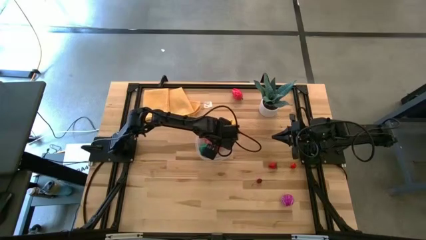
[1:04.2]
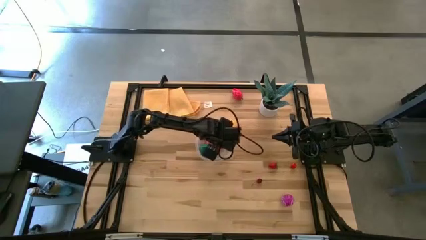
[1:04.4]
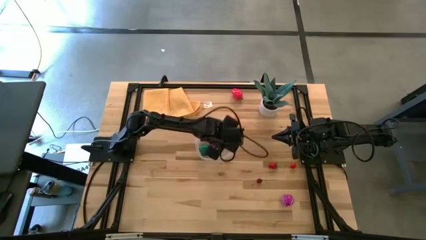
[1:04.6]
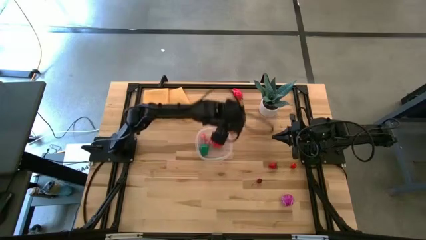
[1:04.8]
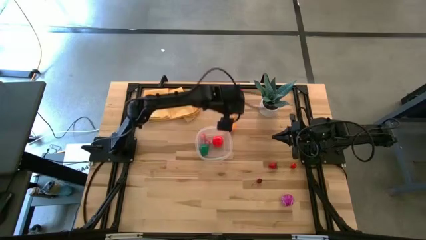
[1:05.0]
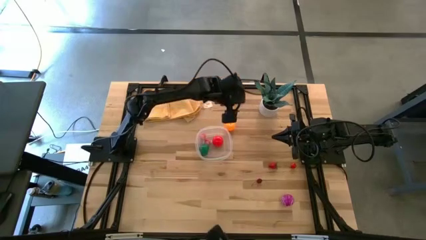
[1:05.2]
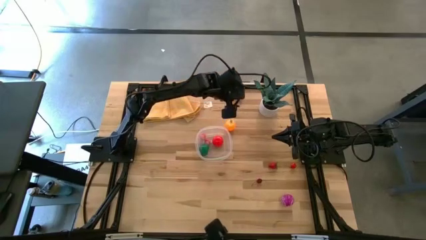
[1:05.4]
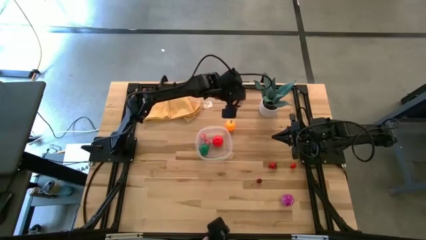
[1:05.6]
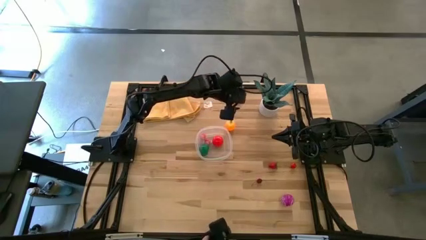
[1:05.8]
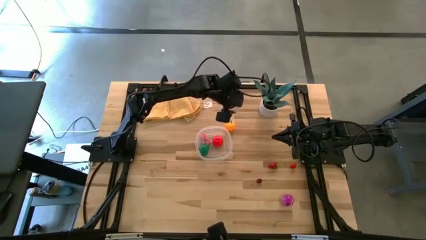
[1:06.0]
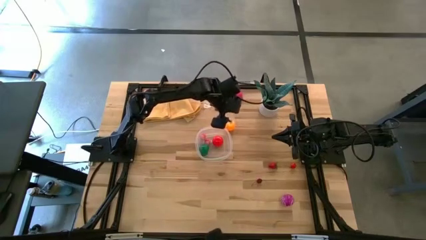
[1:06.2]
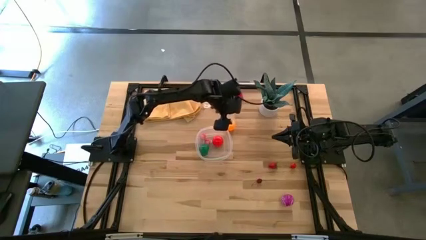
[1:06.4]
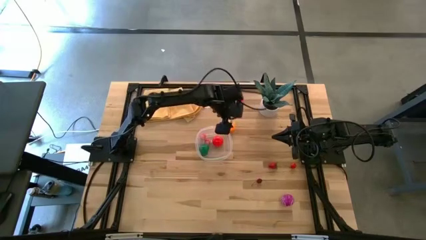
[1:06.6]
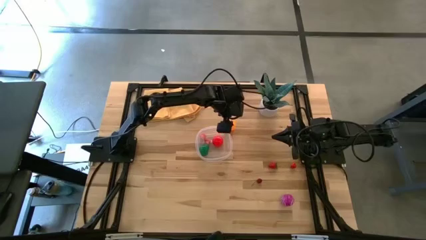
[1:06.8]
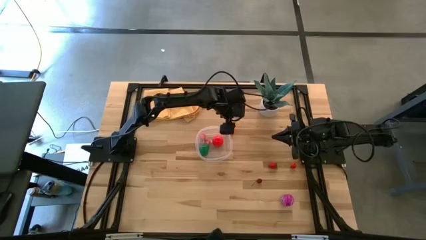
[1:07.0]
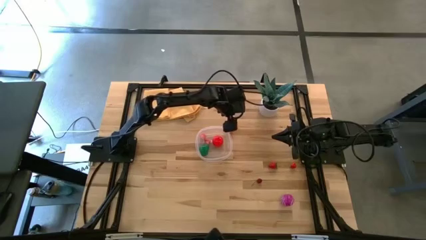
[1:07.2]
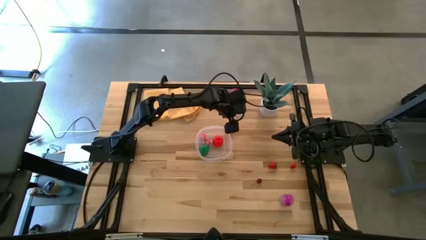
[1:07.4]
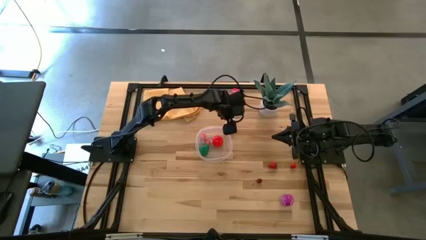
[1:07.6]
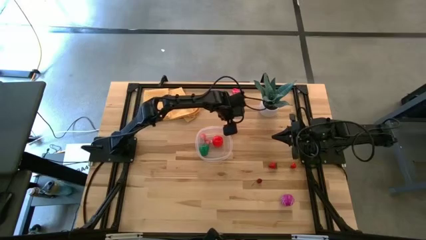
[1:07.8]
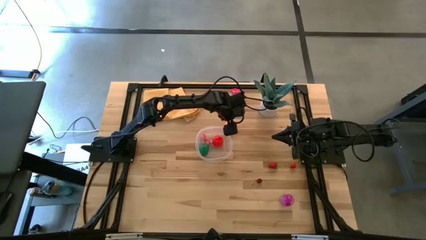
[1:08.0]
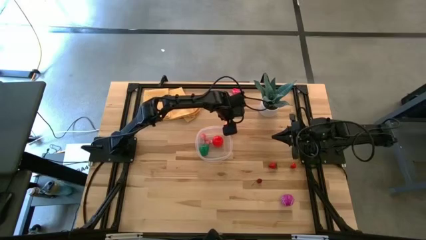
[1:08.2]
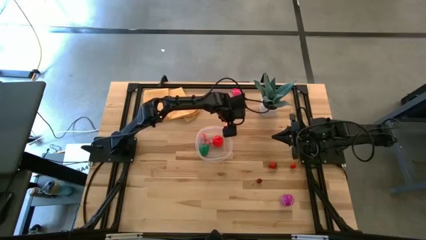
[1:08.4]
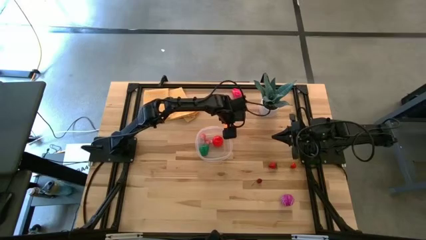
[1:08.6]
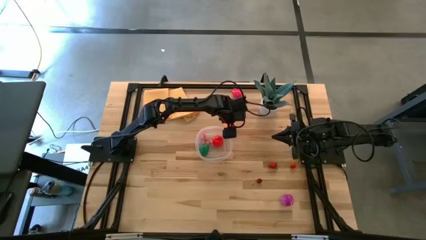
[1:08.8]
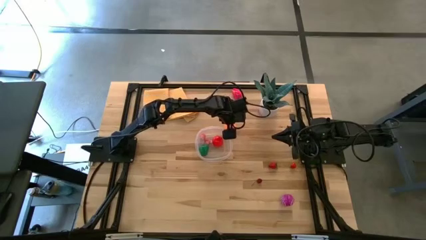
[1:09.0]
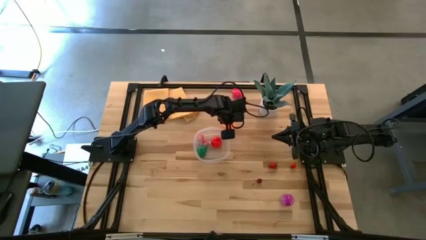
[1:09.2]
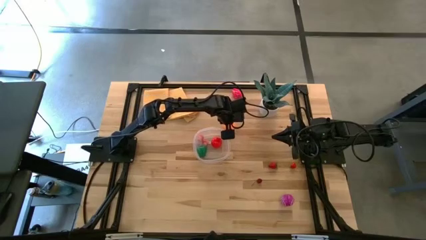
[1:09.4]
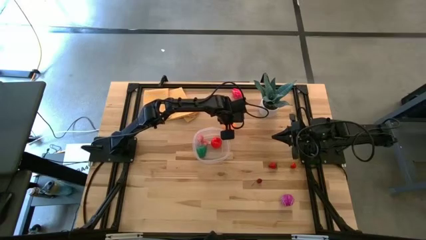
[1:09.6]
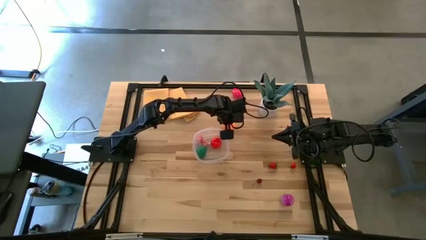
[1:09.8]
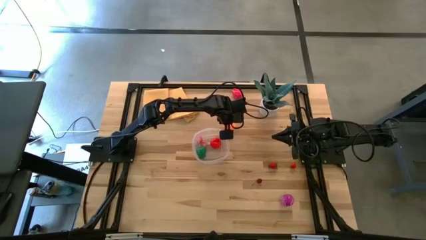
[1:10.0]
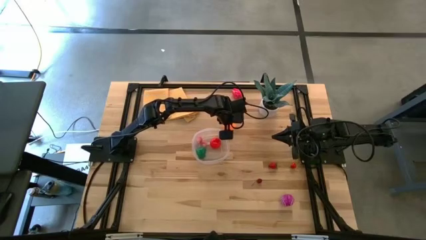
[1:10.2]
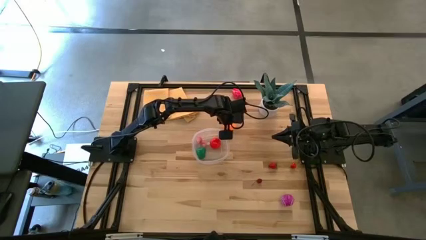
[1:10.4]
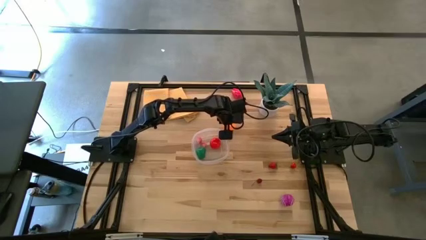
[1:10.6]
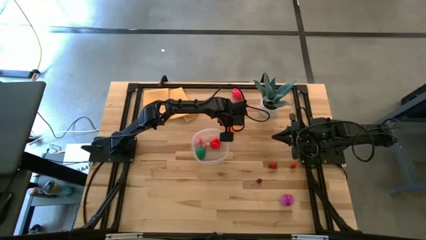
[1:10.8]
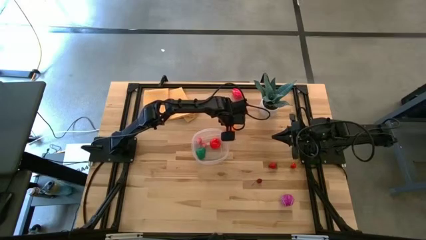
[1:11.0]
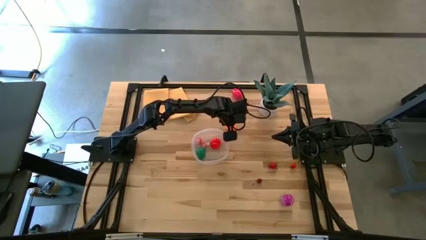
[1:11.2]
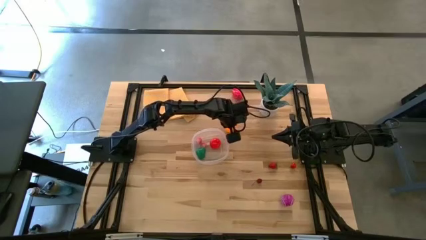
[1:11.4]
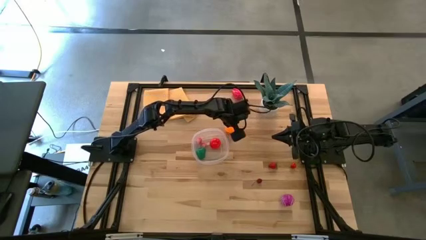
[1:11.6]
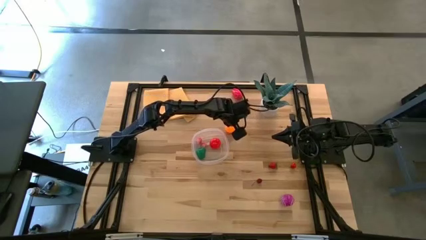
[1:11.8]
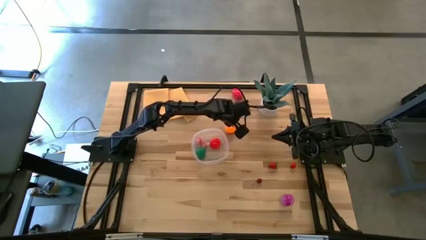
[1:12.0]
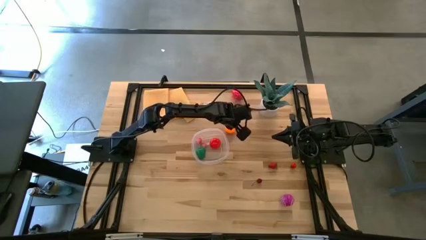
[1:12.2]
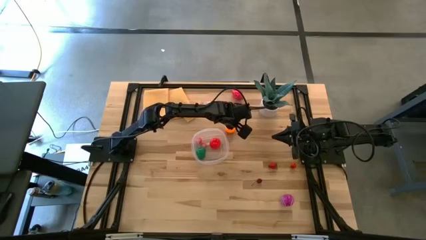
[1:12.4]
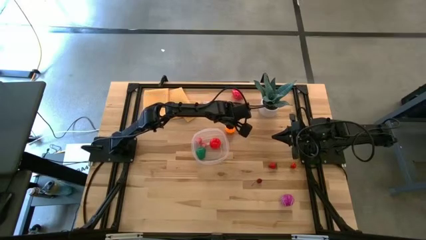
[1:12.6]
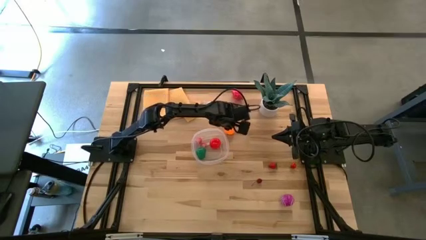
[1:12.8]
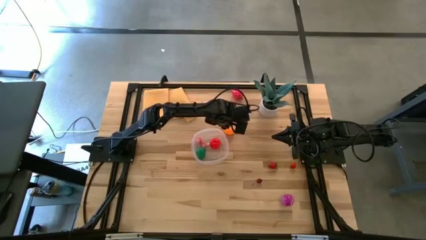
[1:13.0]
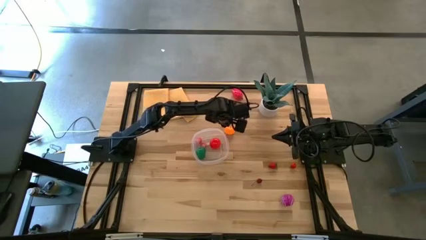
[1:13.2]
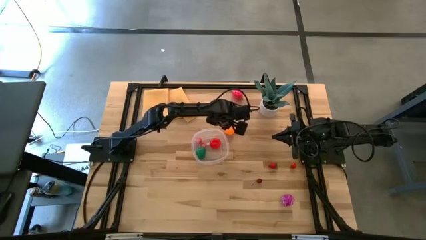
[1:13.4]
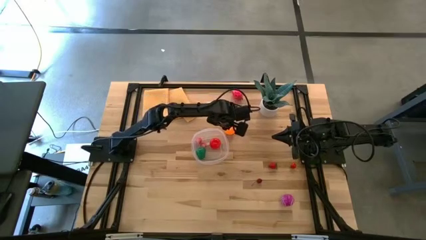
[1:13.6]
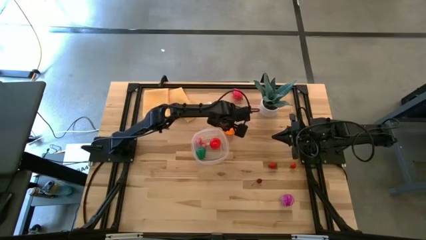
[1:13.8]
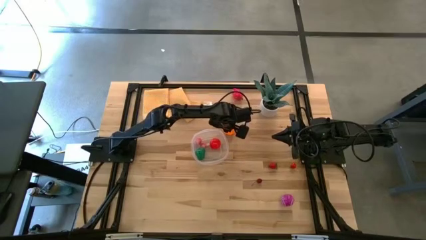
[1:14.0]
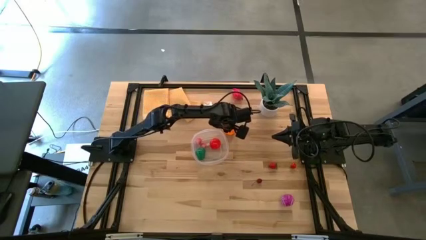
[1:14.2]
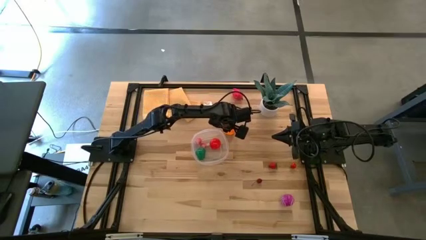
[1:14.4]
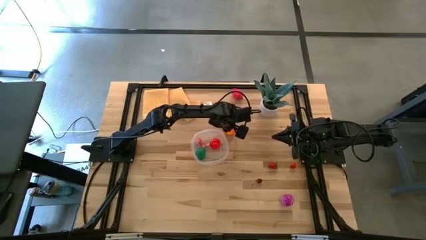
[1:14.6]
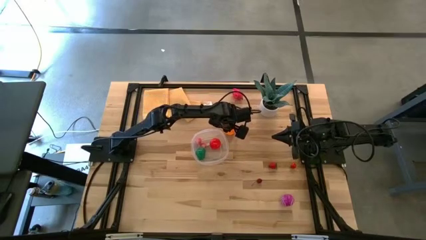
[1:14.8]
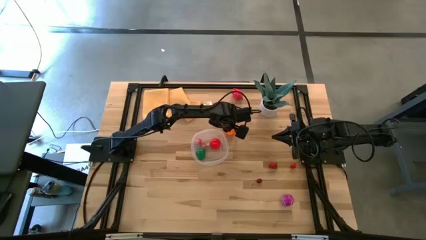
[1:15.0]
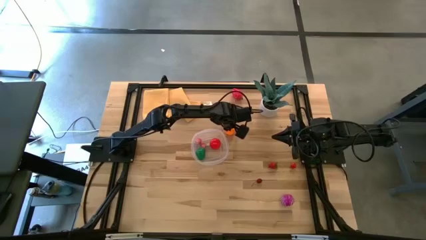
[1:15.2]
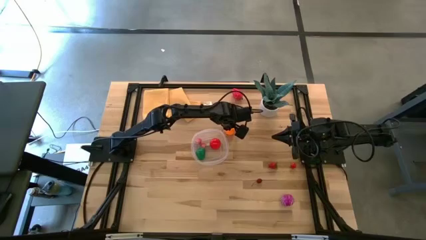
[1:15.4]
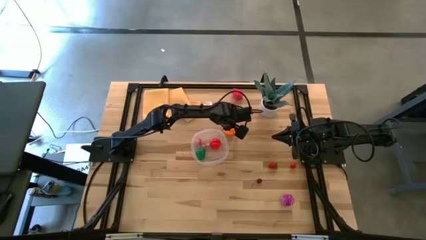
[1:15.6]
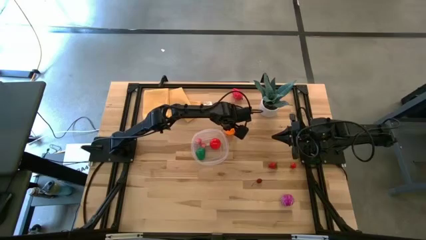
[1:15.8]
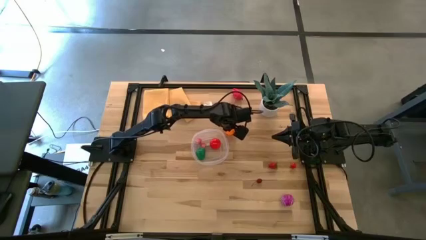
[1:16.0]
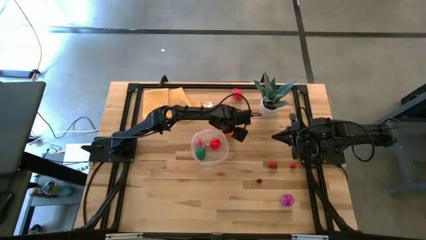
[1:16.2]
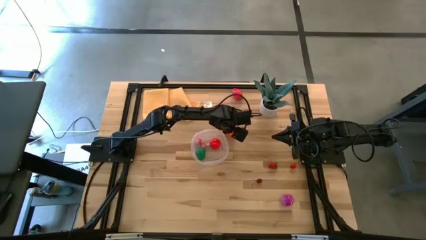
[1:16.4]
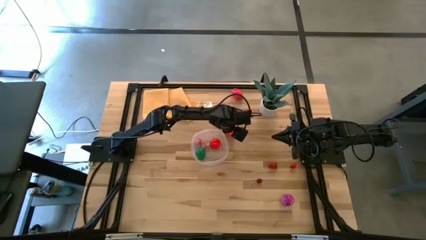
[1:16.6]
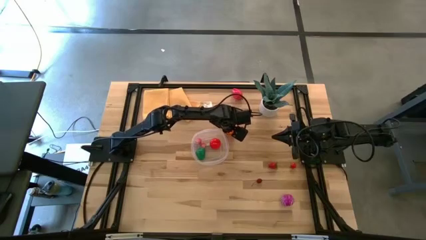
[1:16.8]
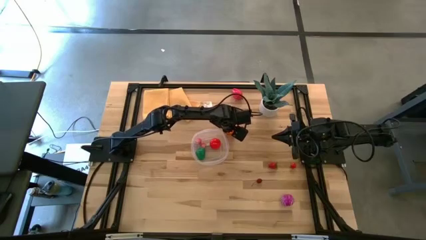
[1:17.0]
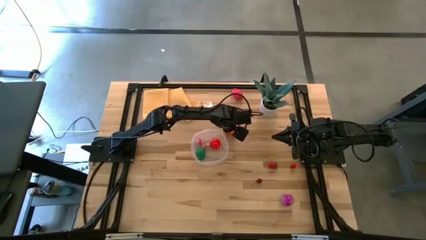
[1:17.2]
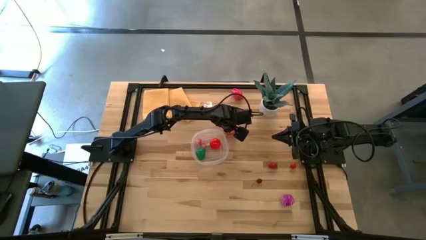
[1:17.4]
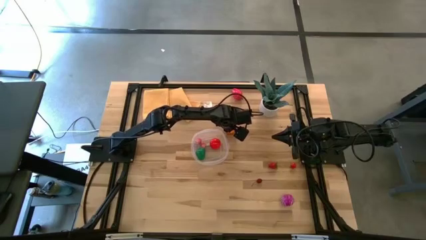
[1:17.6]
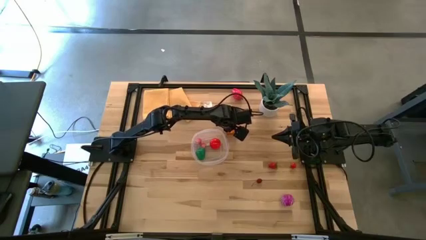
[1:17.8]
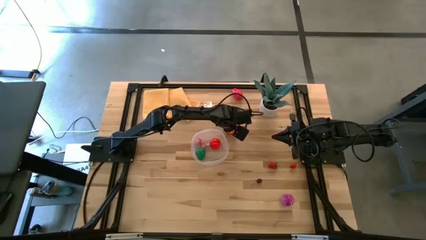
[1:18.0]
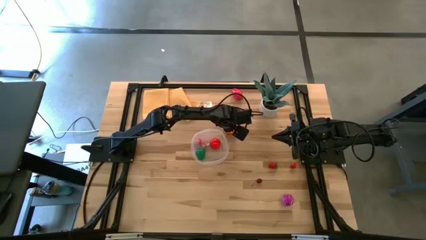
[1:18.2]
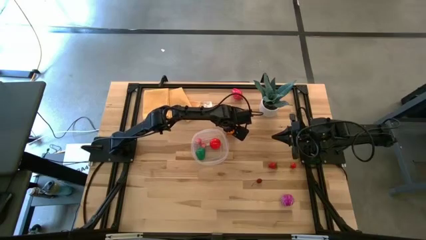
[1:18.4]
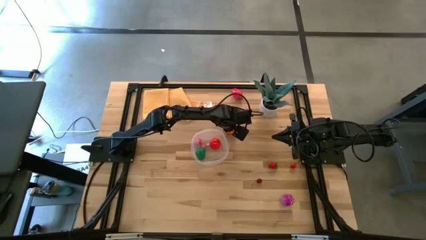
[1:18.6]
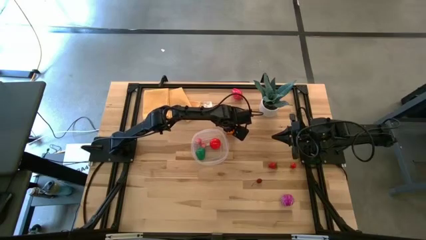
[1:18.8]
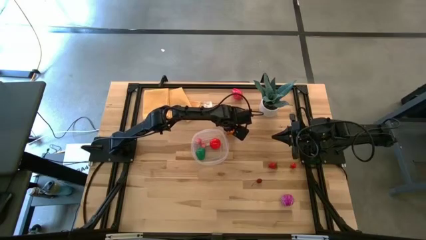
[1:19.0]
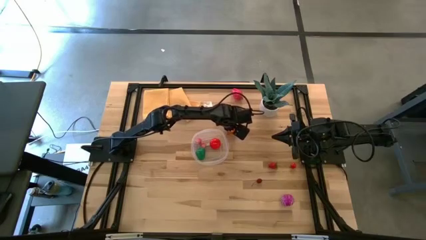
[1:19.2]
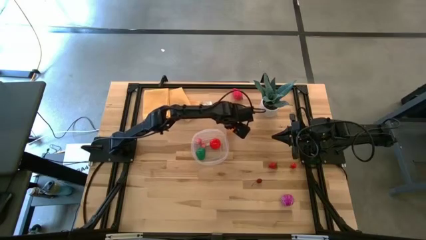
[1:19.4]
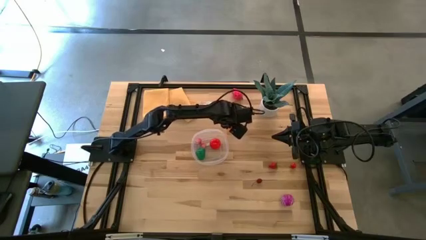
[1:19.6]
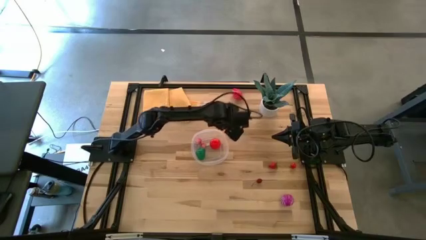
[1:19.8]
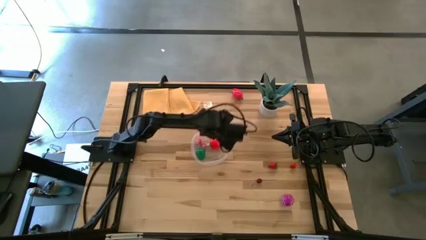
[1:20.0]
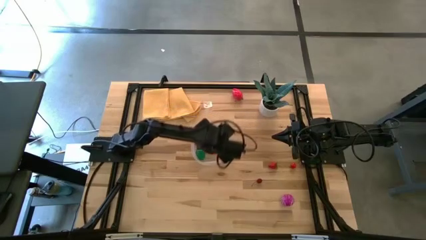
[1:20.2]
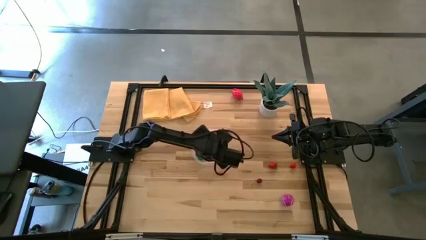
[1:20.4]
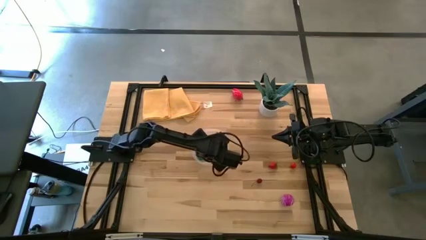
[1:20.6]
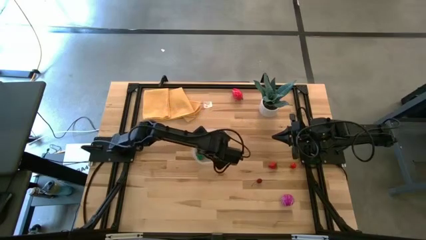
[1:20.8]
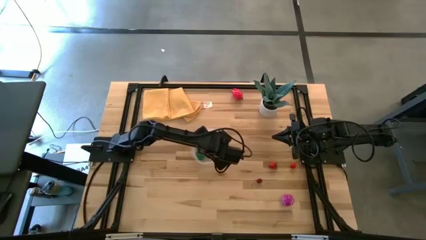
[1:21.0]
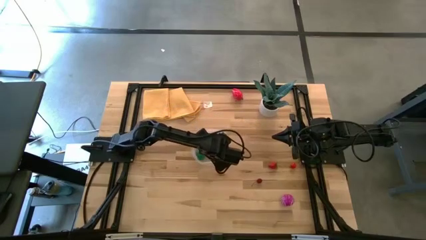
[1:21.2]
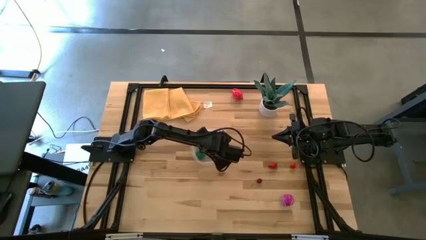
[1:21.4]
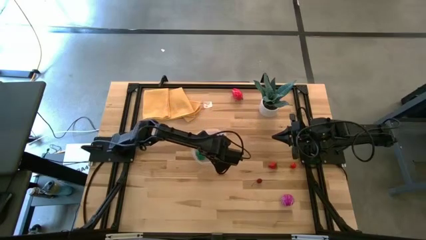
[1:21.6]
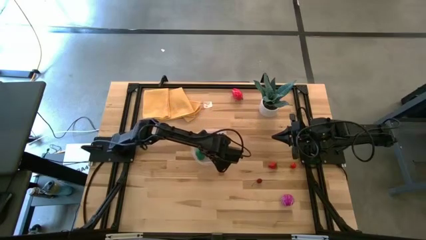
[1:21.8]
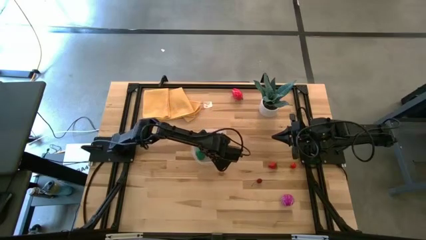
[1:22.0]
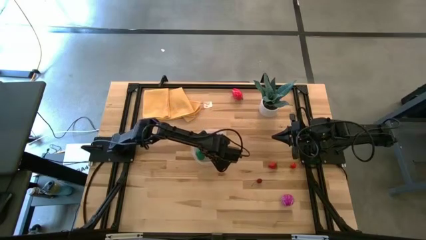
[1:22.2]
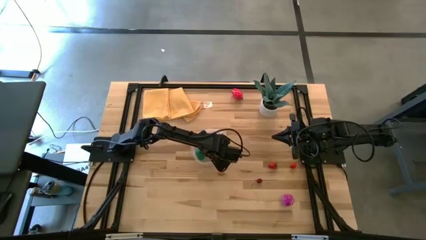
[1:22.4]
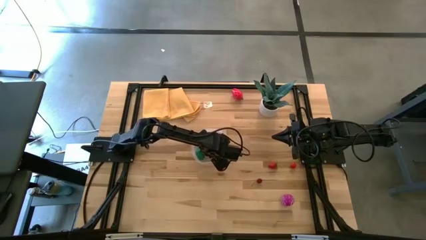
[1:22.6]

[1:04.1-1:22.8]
Task: Pick and placing Produce into tupperware
Put the orange into the transparent bin
